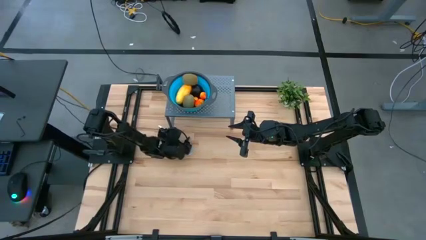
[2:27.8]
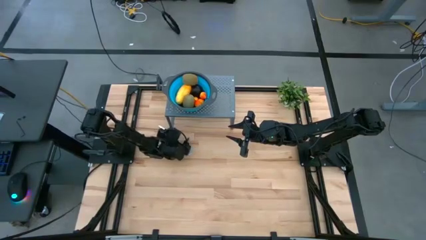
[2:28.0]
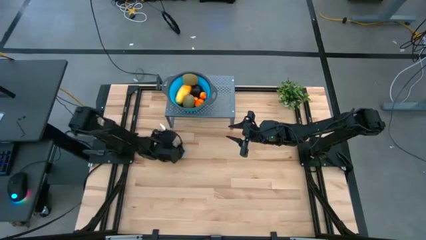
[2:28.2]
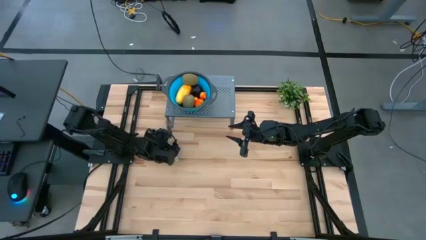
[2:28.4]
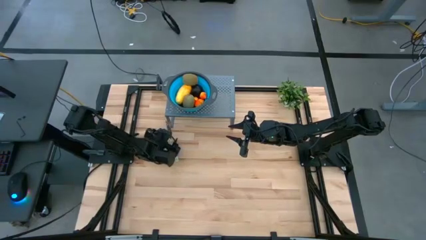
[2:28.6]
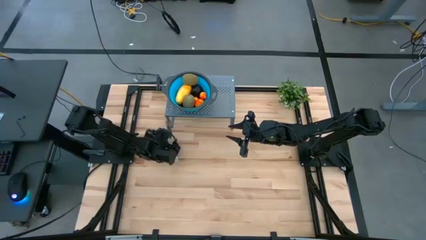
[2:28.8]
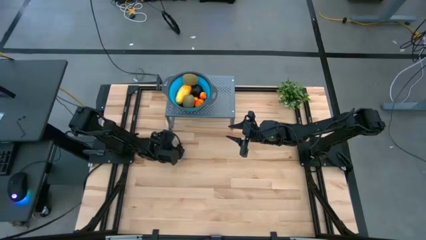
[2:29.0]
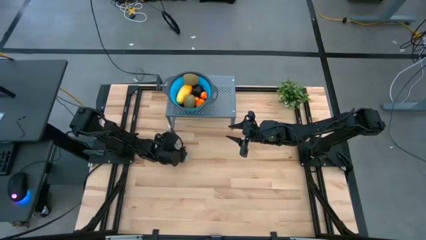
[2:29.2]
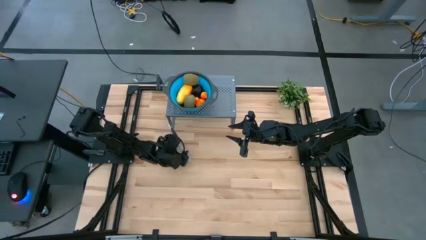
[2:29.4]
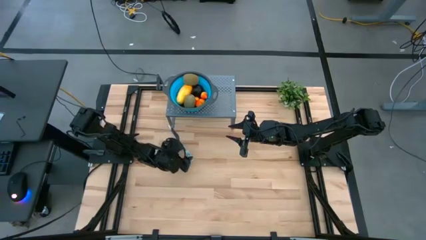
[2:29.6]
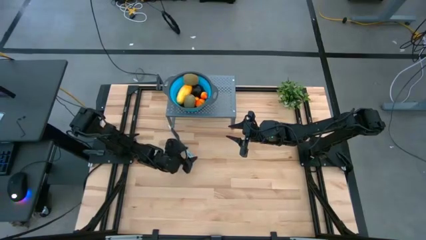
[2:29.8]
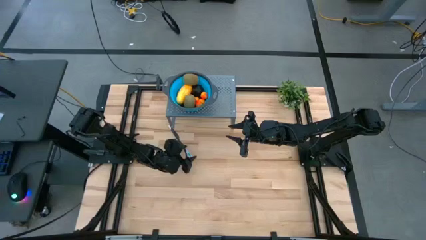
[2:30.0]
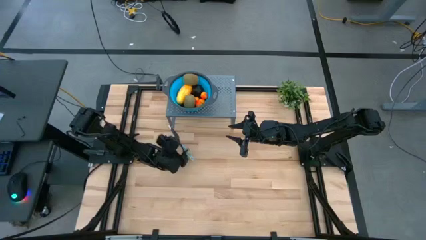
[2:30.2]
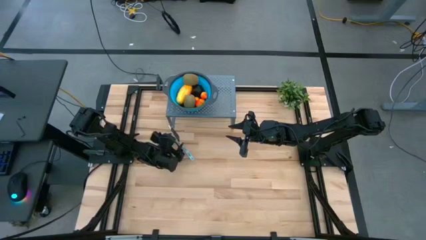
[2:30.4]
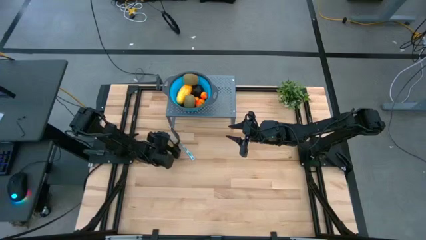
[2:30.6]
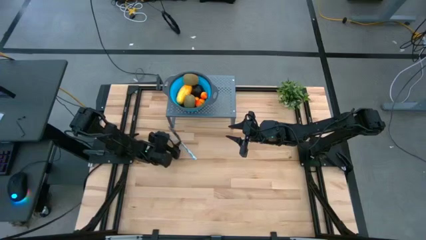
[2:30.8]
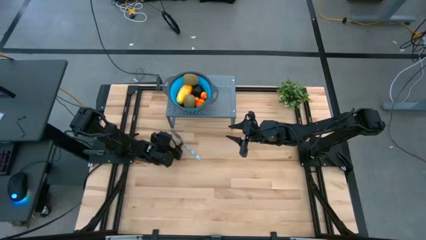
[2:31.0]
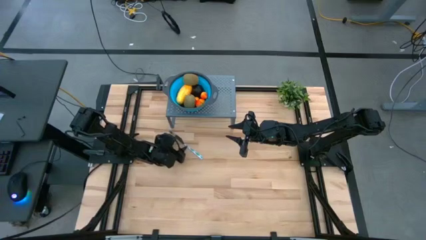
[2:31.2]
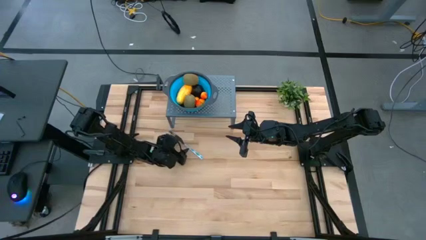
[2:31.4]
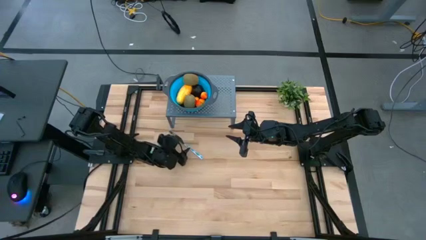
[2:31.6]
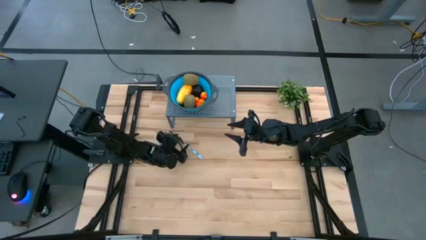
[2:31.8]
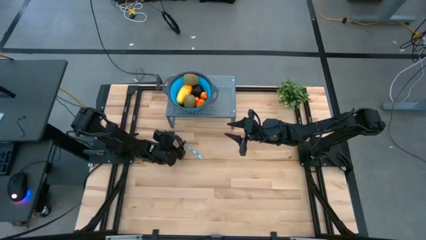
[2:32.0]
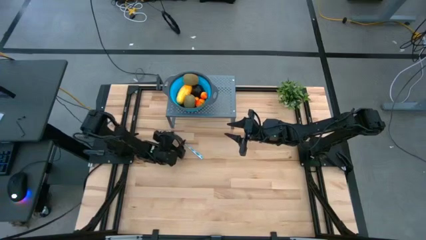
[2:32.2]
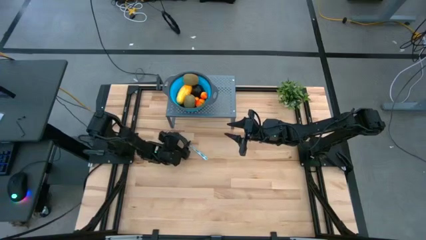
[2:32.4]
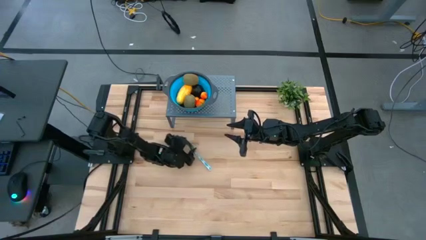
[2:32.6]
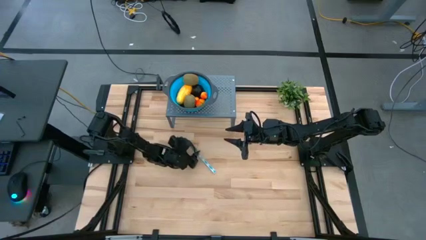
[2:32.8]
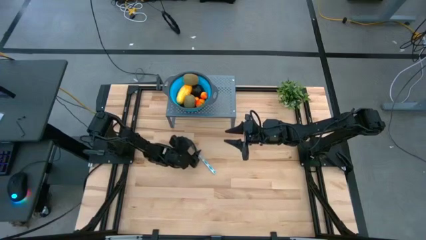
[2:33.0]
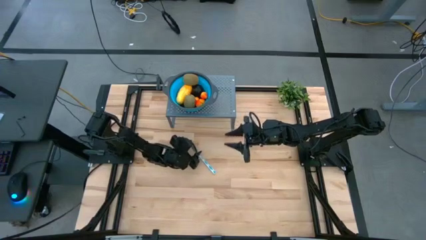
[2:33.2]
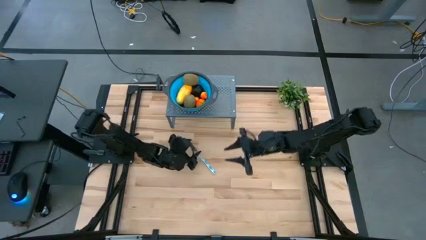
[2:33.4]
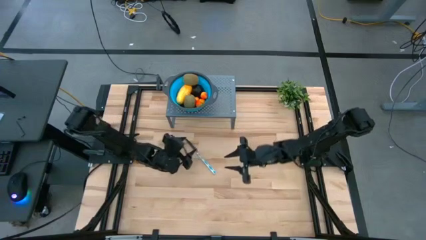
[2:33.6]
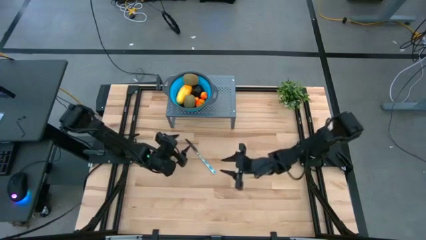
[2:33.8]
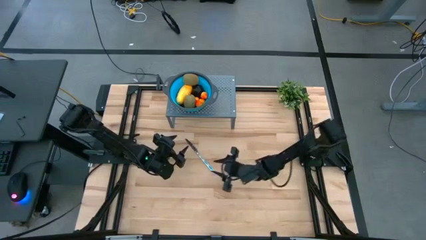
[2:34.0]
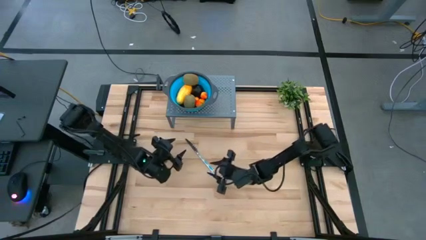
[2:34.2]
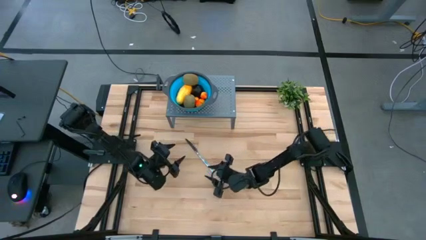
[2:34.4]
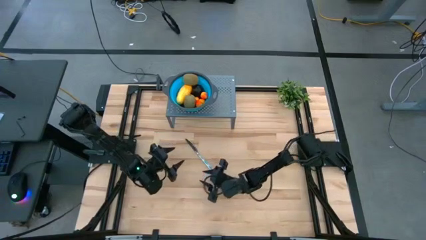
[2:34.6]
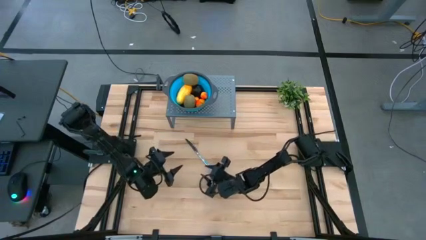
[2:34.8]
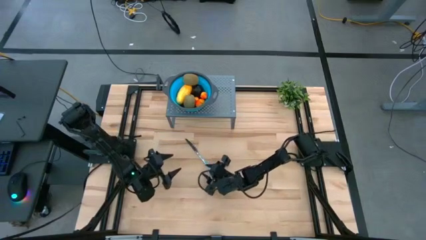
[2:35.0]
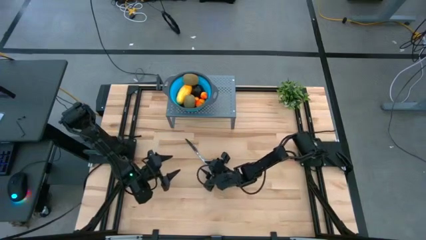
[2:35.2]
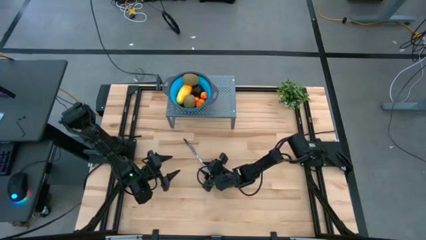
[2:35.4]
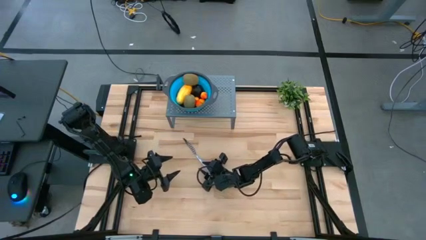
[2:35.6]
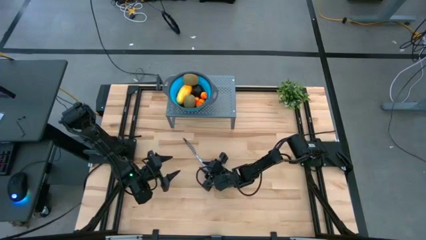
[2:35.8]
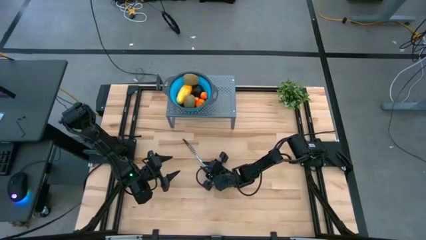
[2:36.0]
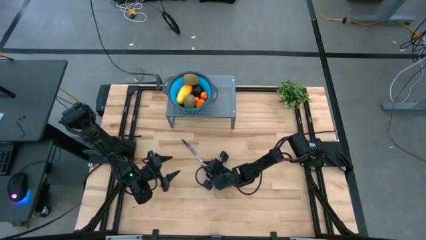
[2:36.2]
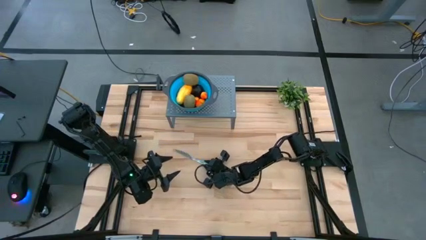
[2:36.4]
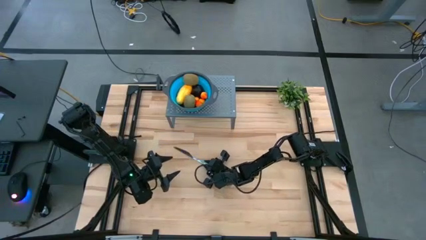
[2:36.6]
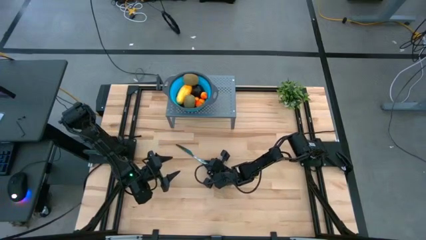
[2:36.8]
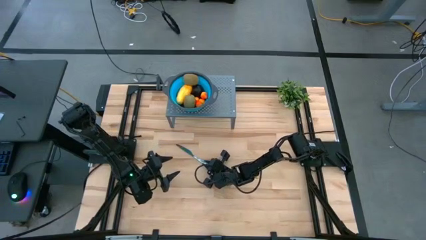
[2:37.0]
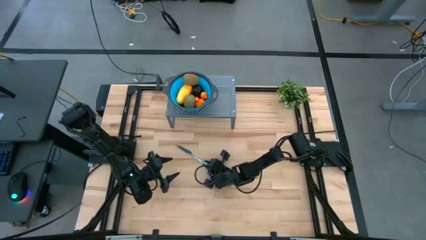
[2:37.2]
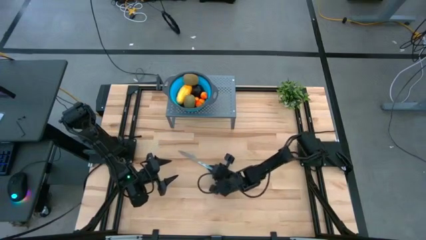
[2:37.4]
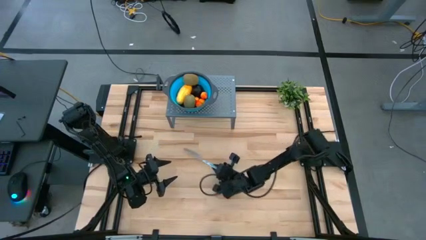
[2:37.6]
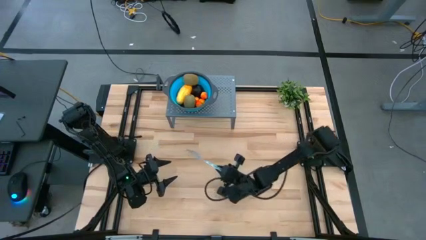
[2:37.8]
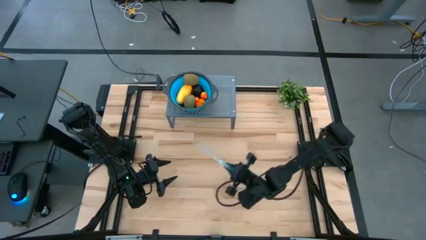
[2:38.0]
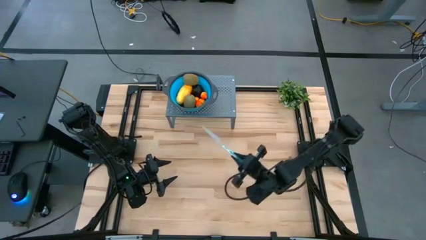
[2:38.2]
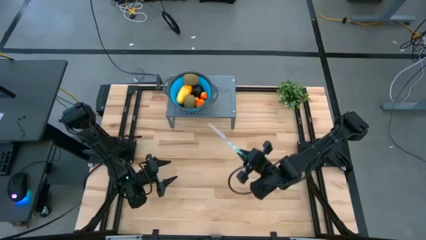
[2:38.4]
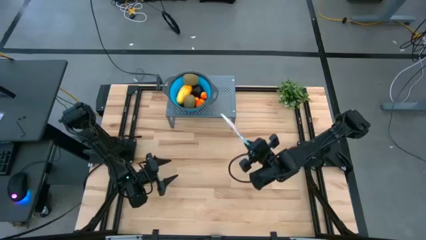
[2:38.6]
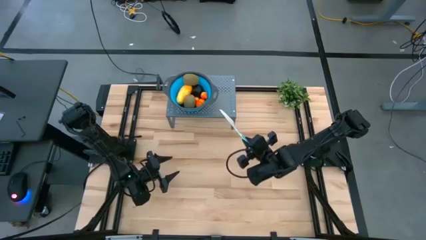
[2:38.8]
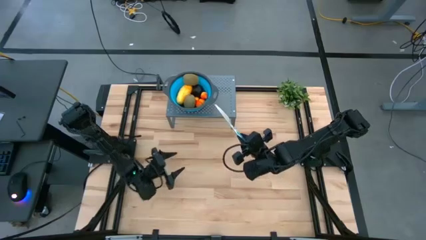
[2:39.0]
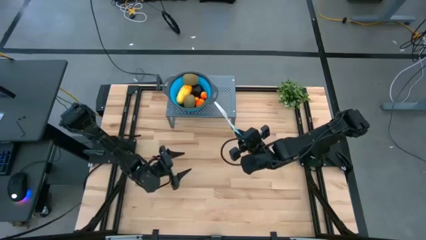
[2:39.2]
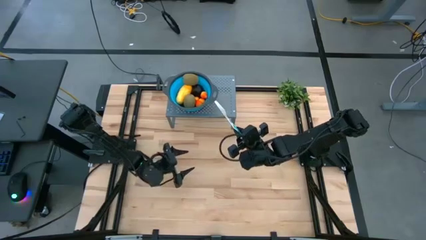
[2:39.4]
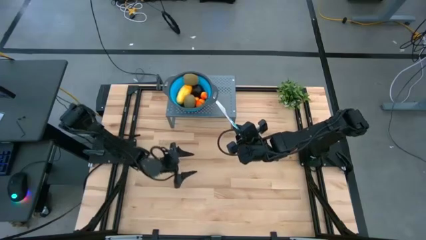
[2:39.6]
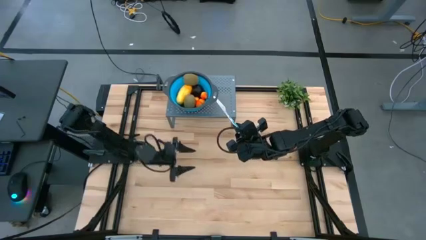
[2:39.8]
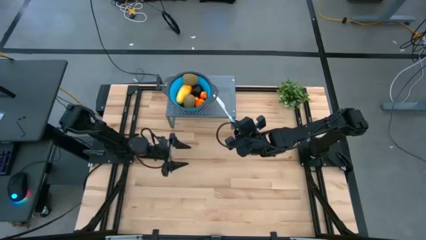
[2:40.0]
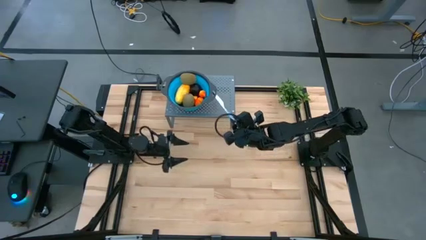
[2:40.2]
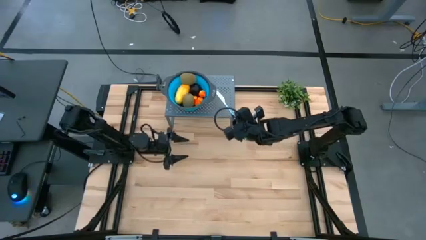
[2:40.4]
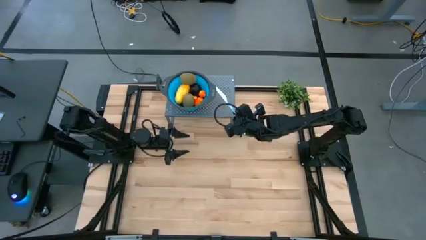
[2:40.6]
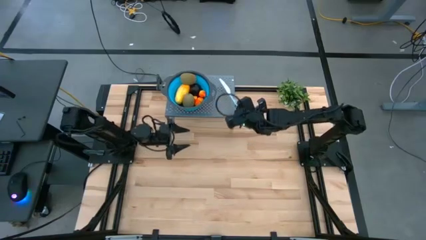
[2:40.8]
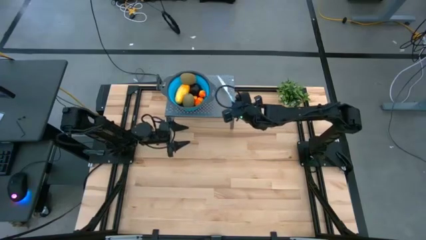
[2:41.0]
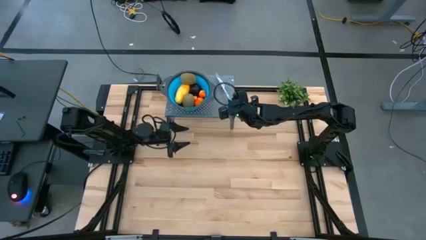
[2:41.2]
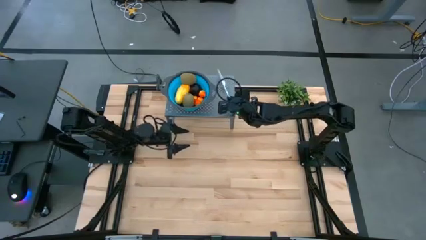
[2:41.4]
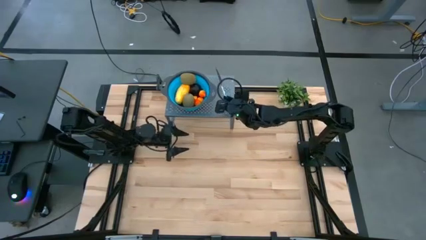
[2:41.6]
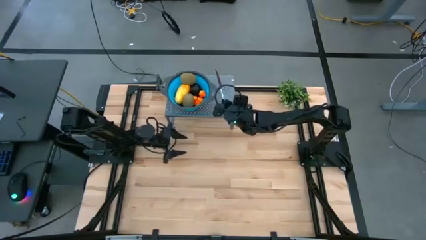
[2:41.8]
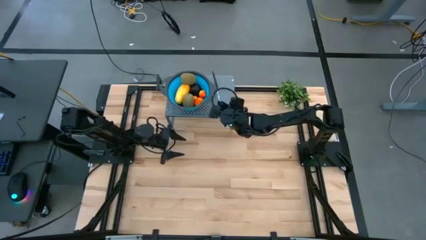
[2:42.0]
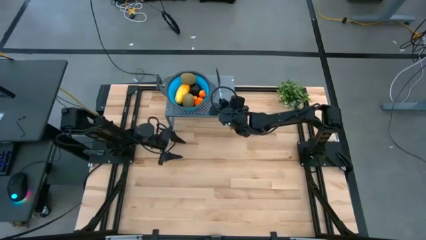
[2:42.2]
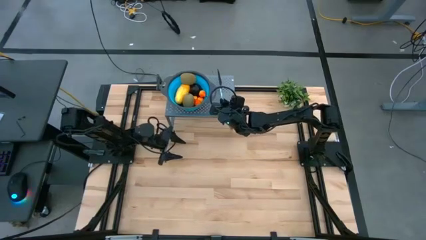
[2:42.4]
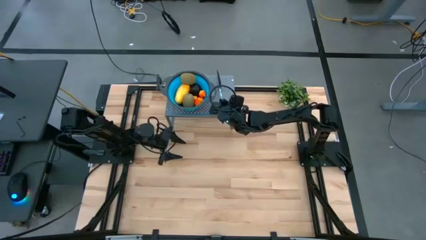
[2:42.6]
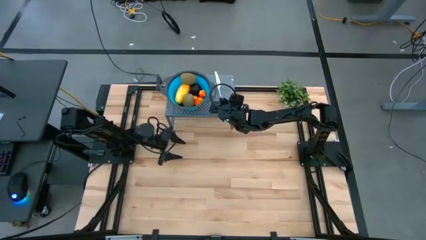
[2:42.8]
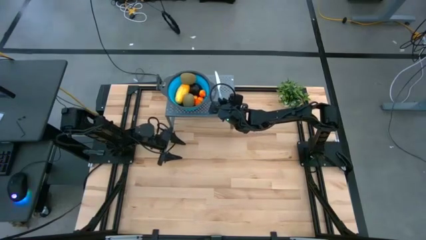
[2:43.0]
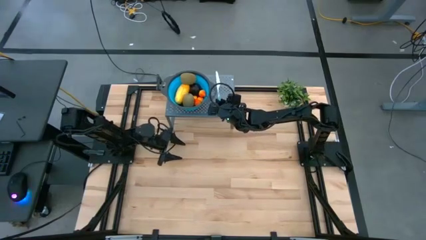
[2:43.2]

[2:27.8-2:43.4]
Task: Pick & Place Fruit
Put the blue knife on the gray metal shelf
